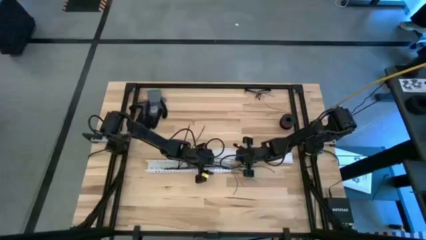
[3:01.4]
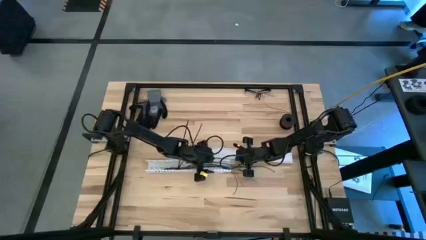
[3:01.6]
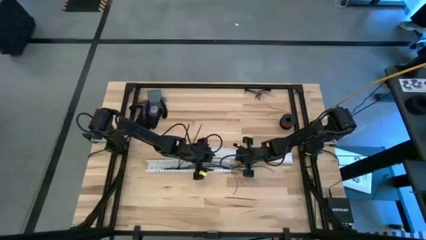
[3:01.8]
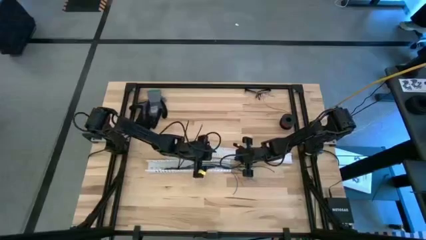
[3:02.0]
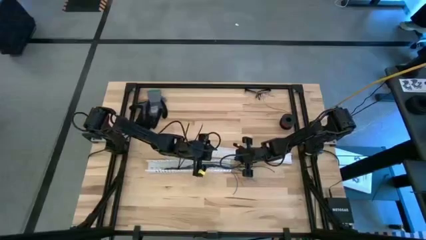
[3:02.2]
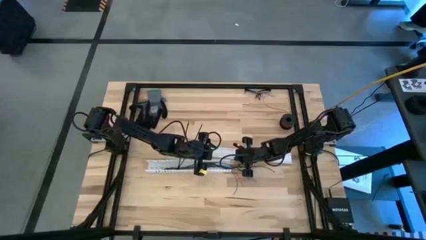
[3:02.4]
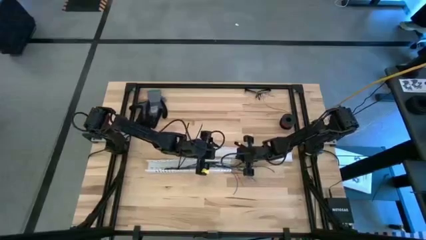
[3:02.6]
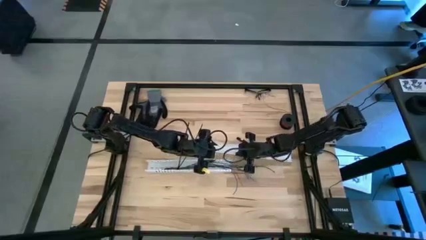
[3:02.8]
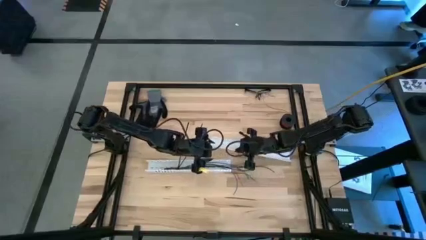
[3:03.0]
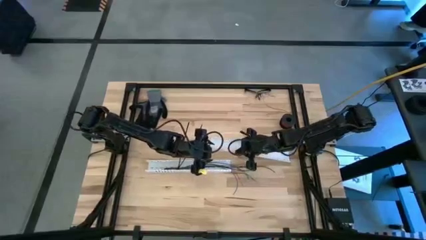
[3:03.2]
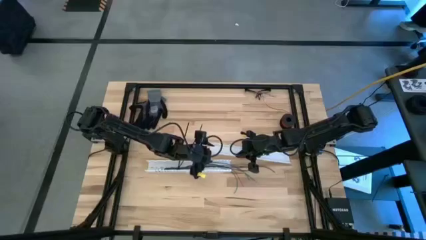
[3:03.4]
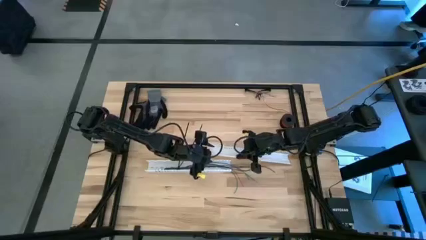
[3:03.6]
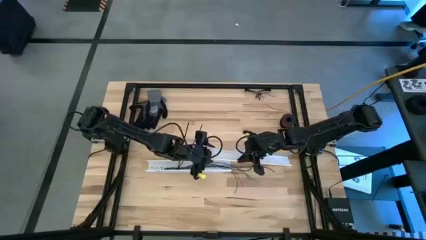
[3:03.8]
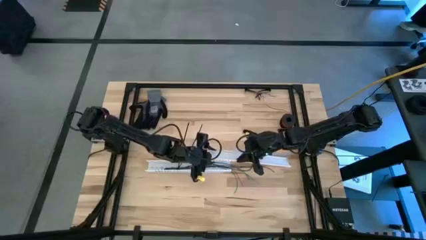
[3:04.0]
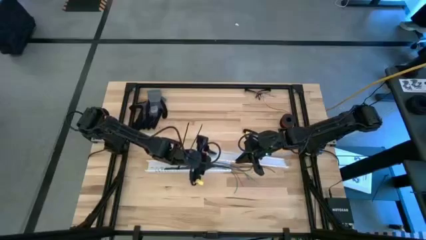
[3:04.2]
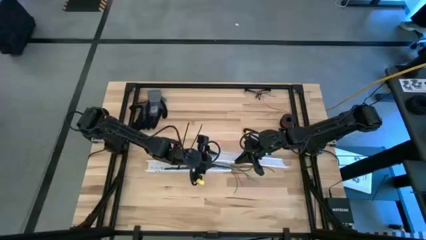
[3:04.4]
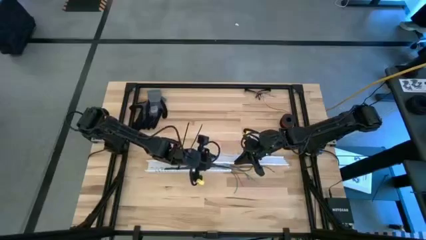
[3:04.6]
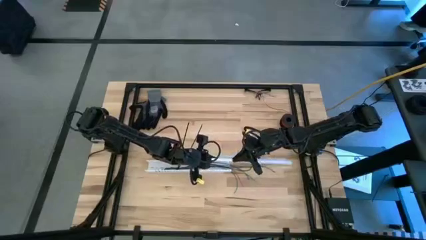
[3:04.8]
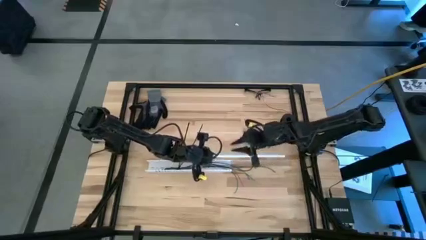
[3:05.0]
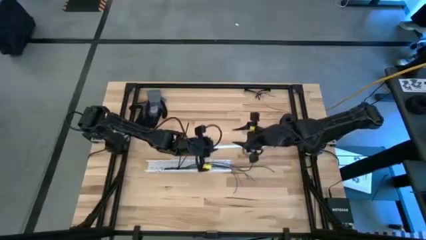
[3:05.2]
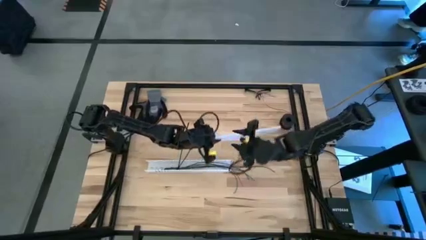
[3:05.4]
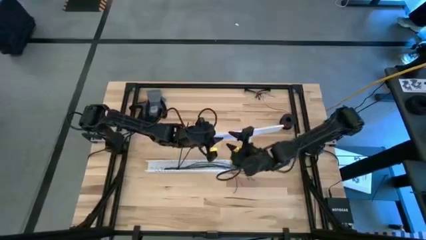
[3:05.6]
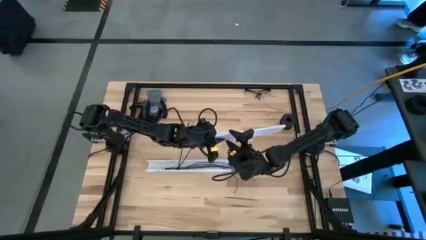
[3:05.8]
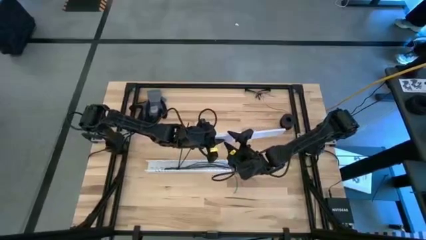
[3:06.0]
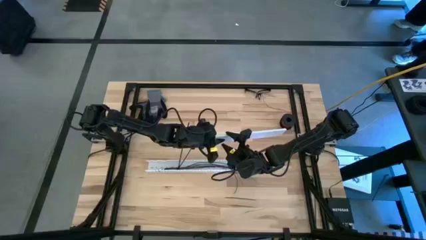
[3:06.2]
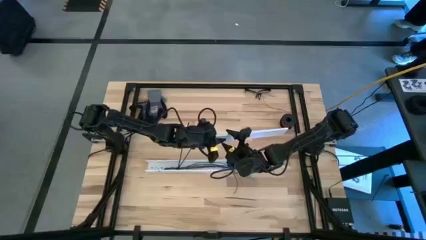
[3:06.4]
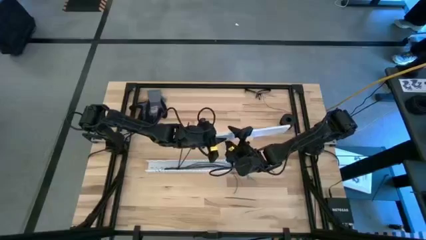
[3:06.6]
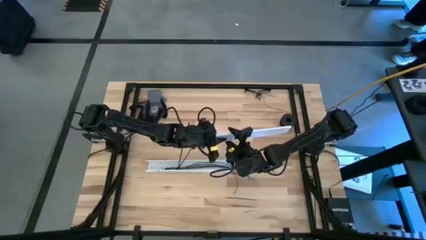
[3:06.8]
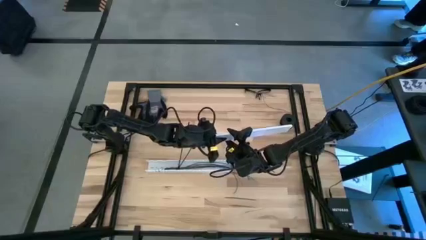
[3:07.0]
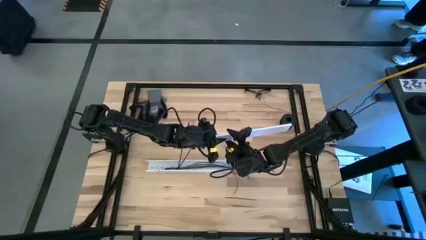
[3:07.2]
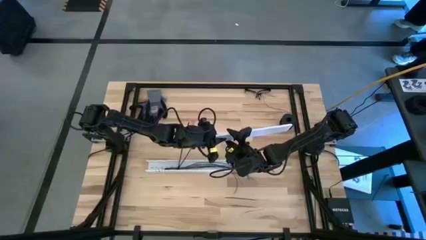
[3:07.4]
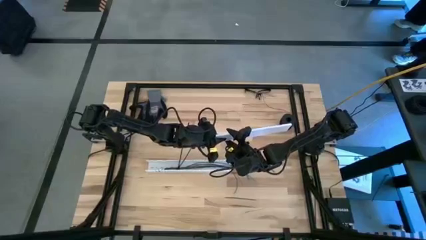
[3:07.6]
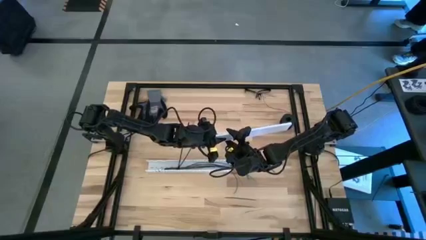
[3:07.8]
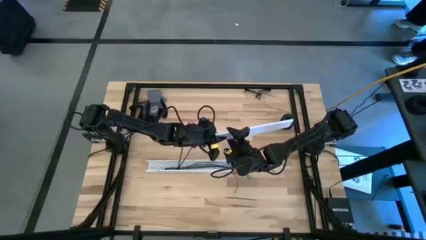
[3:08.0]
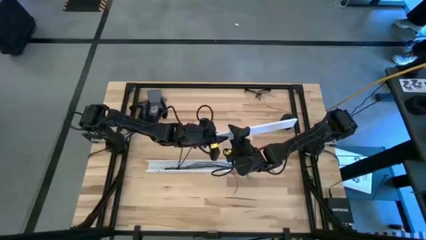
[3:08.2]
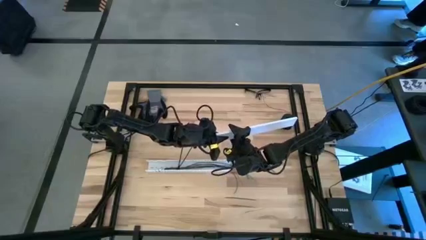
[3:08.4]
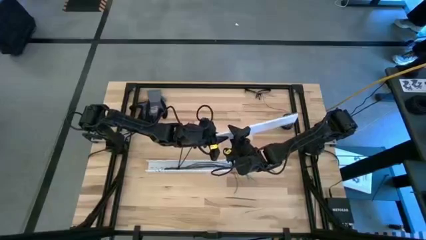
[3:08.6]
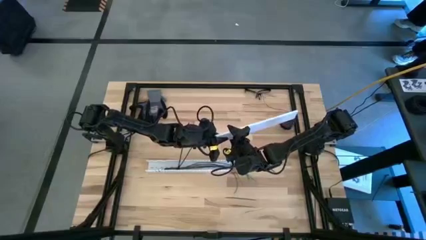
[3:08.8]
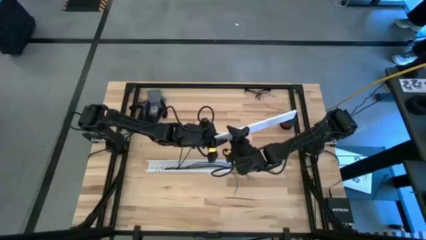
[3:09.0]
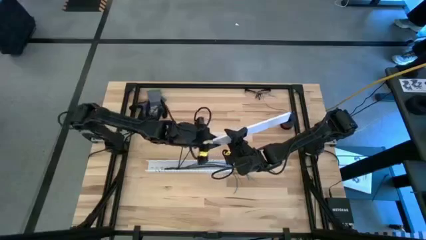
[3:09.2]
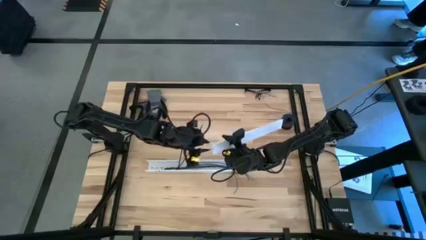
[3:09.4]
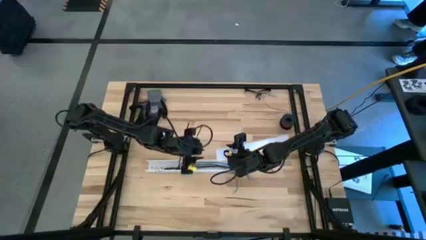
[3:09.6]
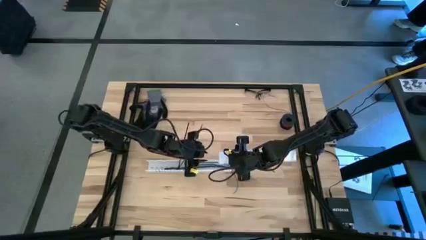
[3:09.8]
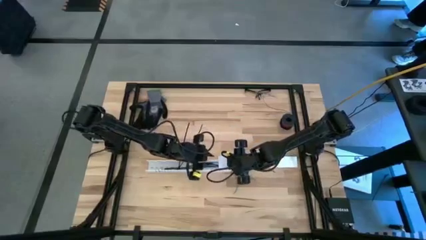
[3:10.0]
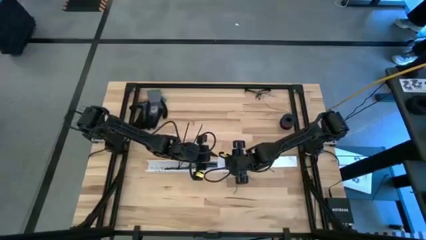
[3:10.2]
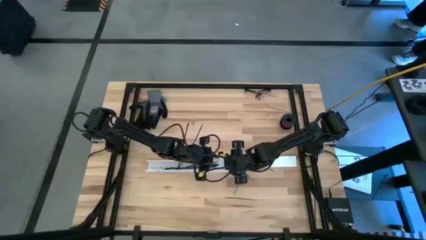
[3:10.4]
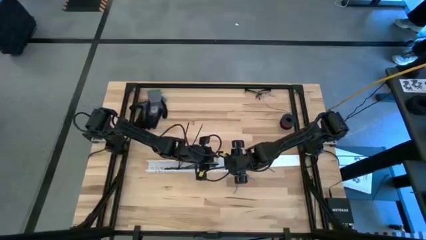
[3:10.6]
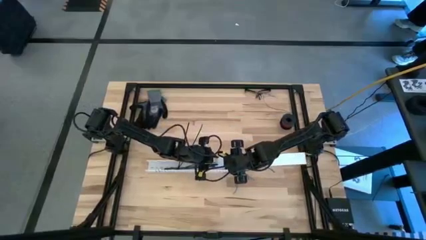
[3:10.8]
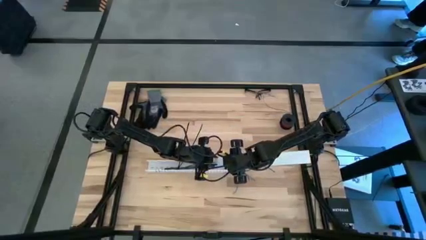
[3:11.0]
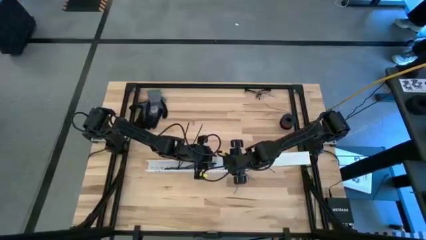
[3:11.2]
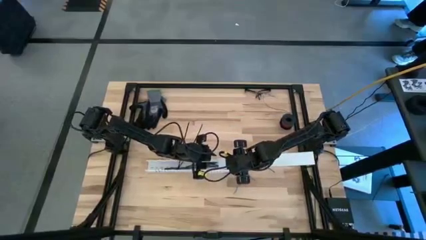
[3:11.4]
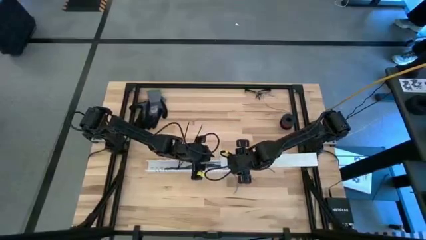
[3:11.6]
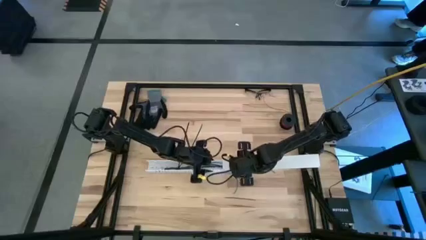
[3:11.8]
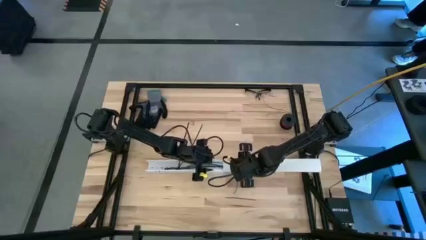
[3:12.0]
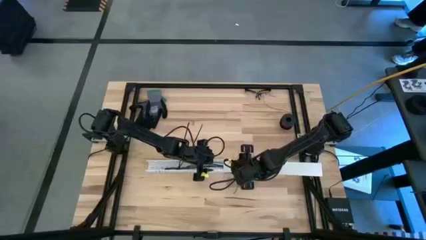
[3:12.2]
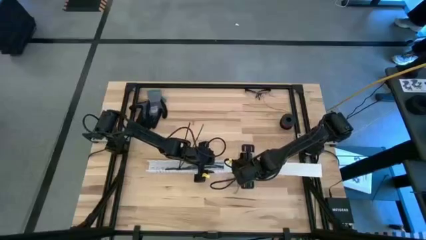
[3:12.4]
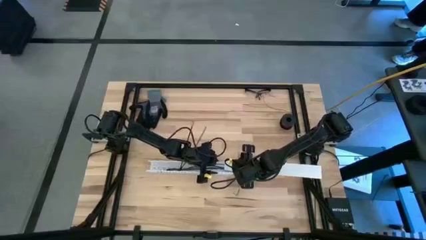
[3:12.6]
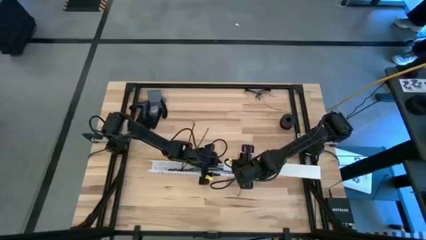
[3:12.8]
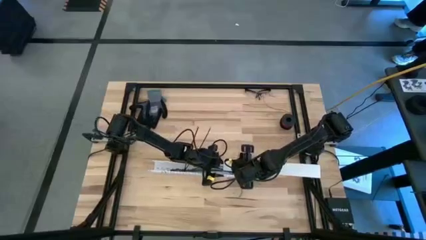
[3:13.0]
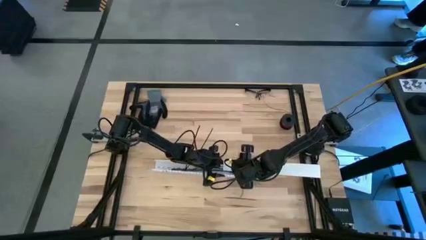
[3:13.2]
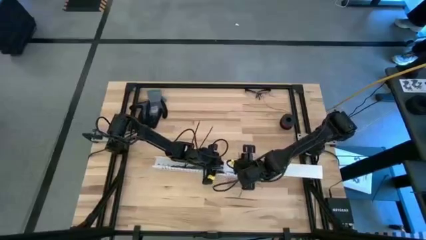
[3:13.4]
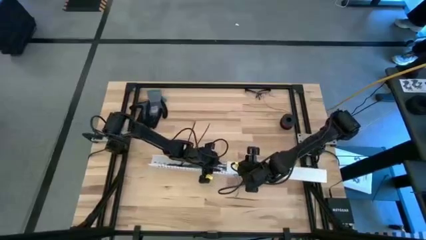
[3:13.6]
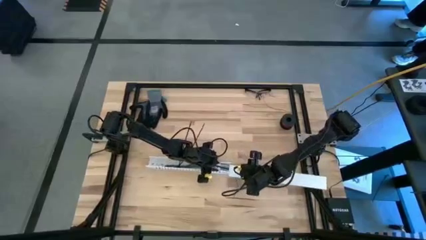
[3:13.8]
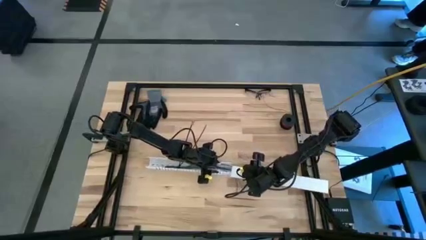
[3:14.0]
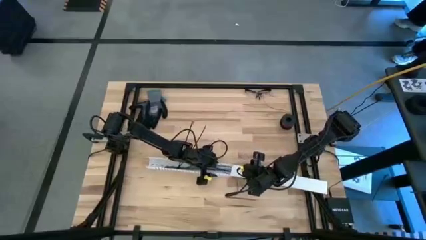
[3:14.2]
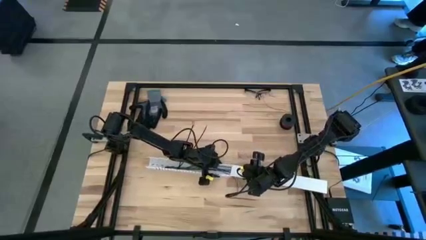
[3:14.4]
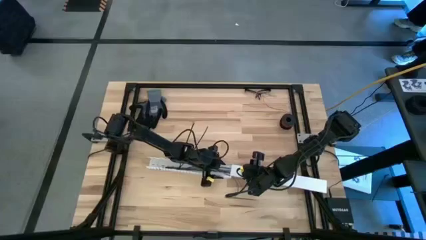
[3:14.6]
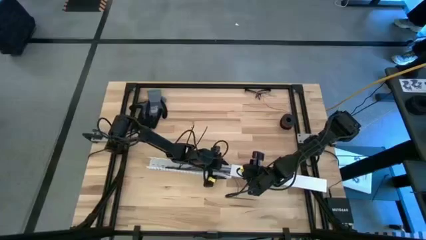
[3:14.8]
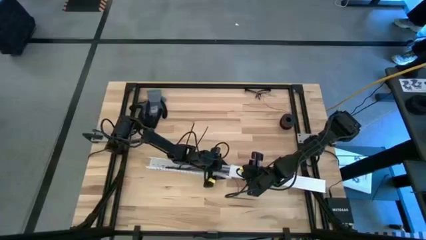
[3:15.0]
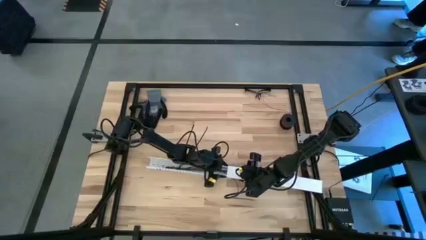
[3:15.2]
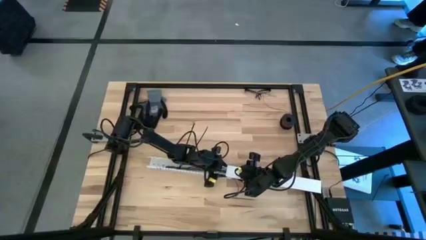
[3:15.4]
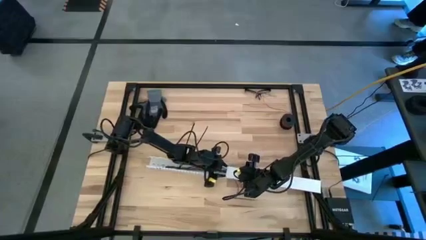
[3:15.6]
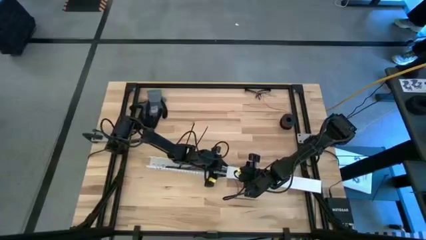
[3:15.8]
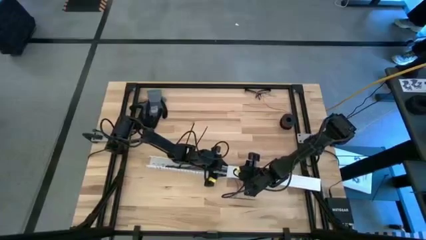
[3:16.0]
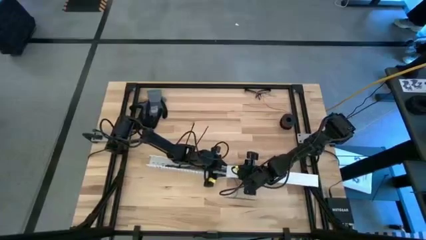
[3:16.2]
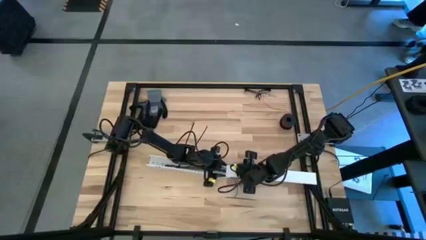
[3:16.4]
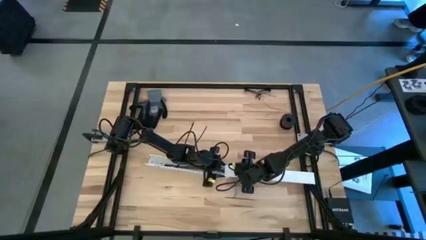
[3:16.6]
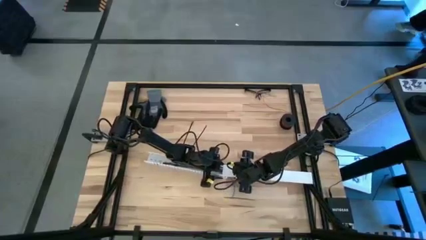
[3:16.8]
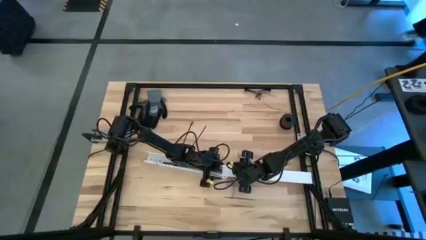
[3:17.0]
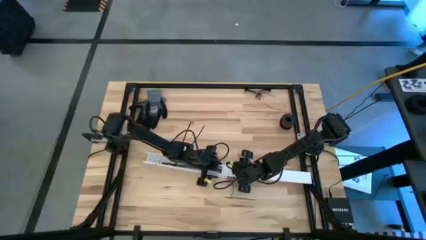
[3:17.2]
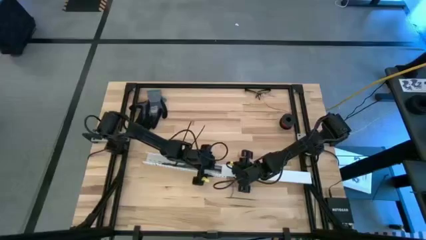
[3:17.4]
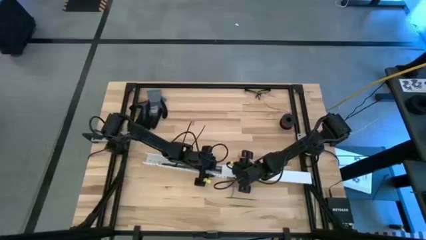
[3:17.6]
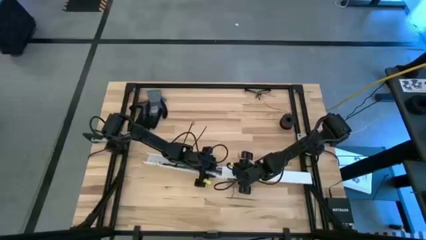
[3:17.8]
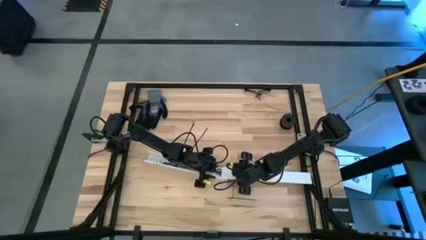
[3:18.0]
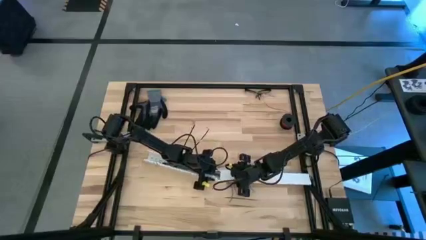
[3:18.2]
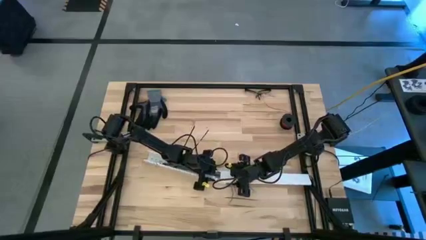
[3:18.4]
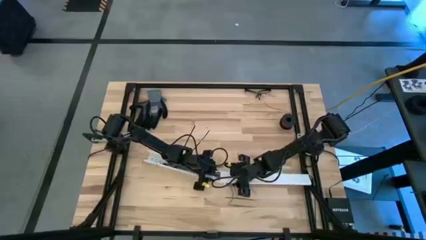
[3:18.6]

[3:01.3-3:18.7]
Task: Ziptie cables
Close the white cable duct
